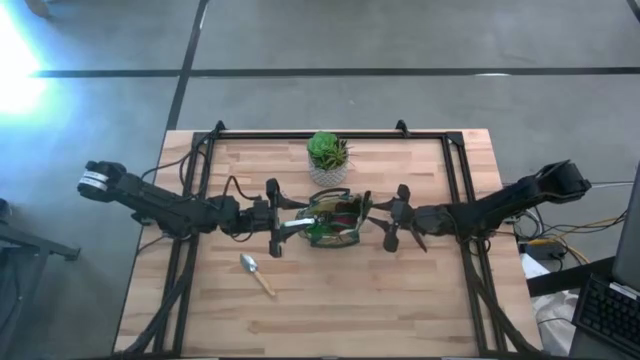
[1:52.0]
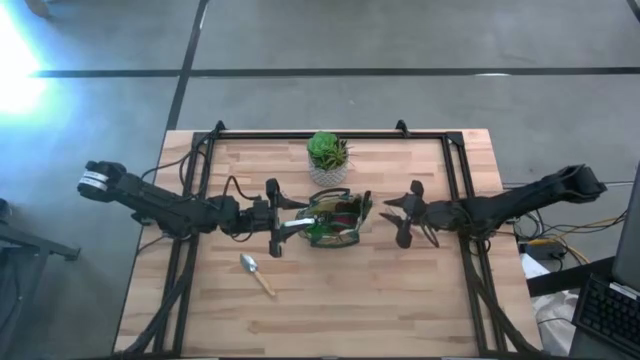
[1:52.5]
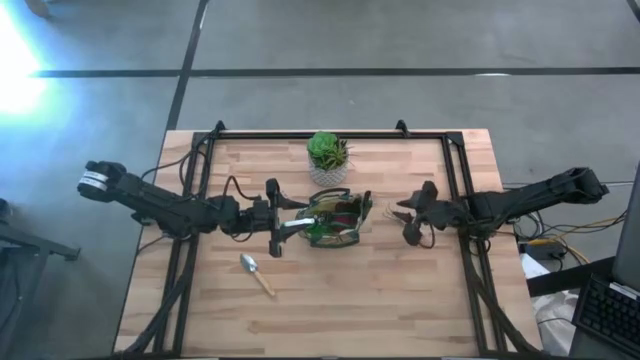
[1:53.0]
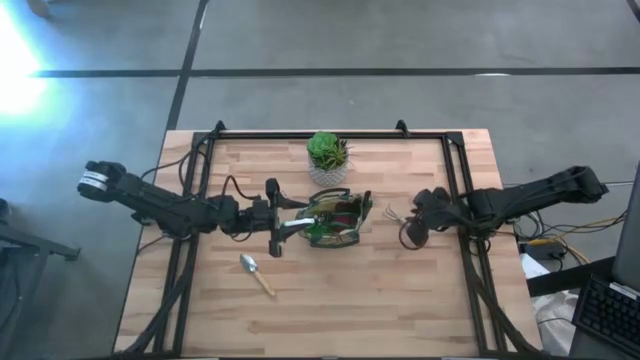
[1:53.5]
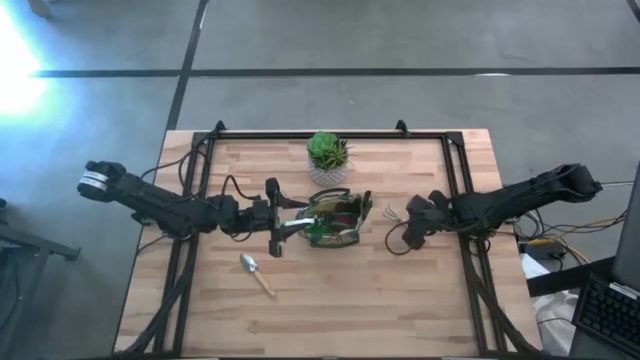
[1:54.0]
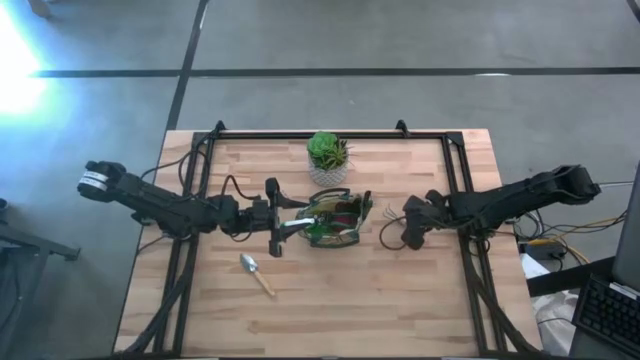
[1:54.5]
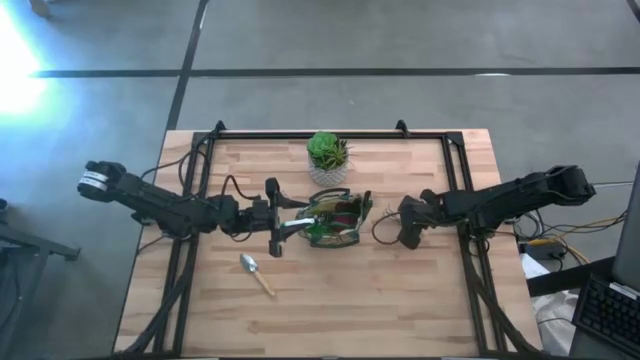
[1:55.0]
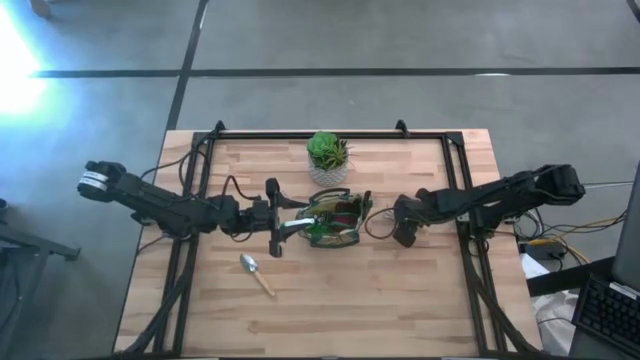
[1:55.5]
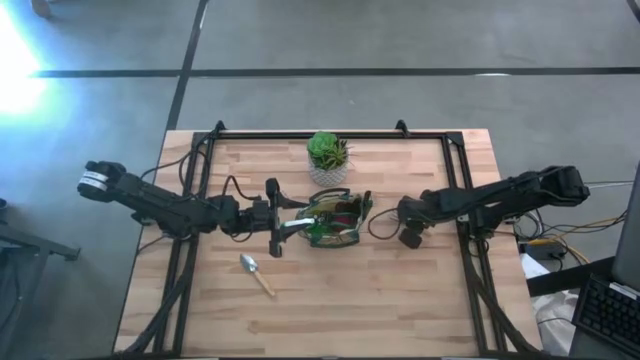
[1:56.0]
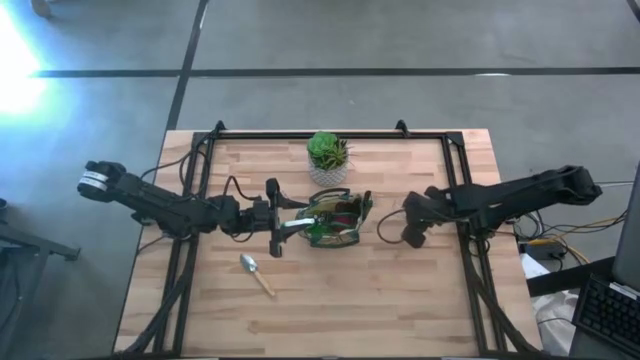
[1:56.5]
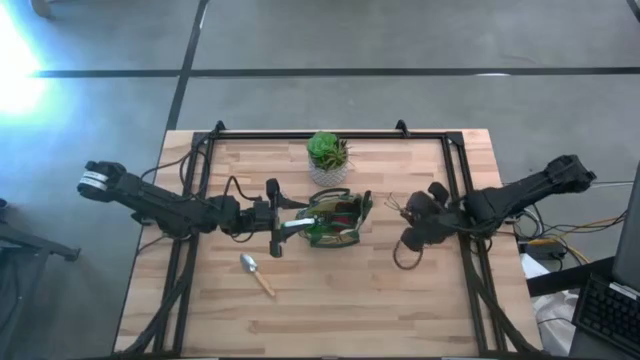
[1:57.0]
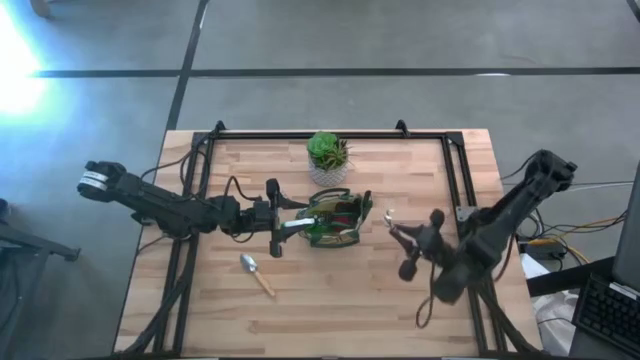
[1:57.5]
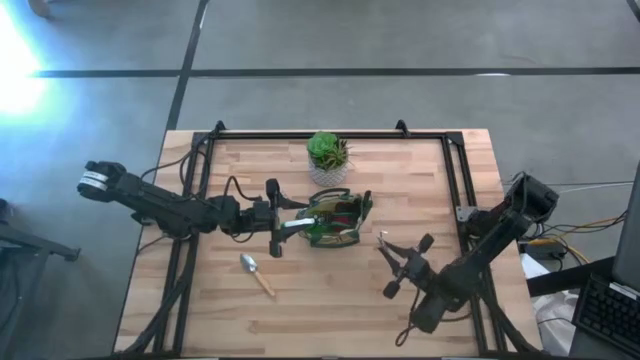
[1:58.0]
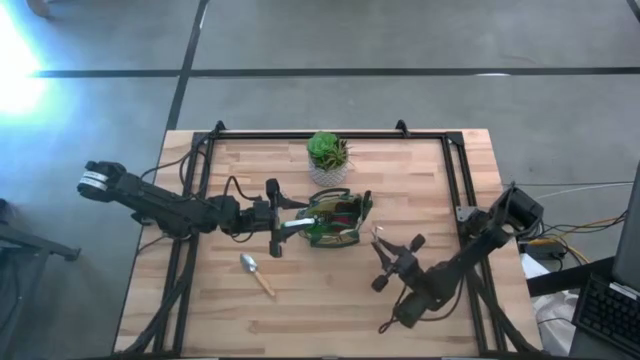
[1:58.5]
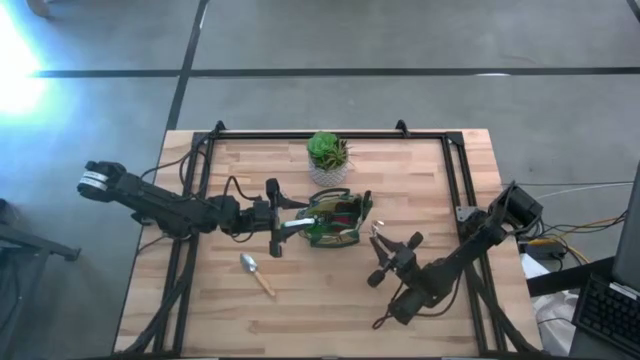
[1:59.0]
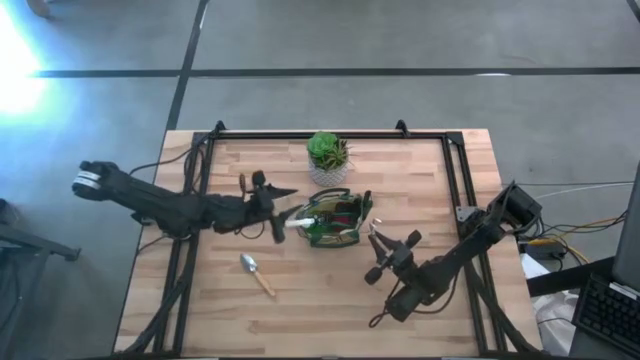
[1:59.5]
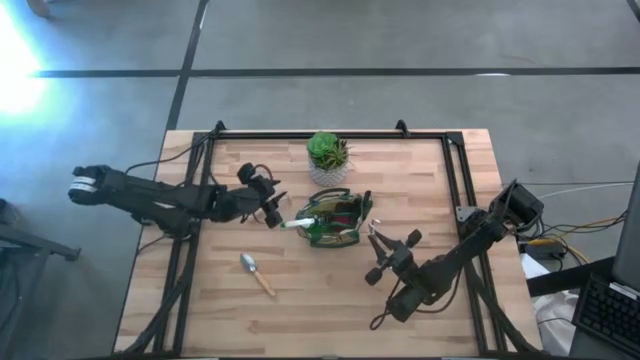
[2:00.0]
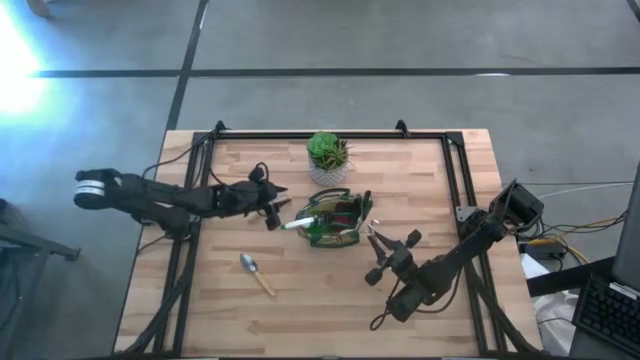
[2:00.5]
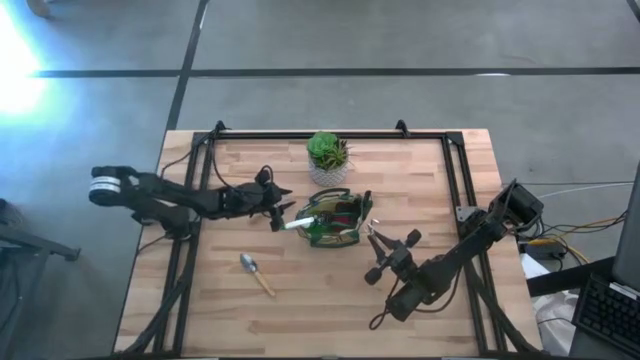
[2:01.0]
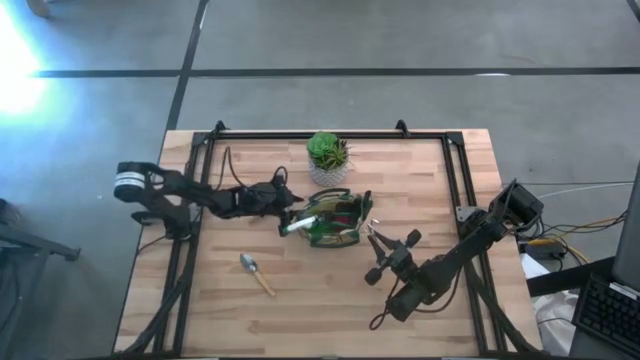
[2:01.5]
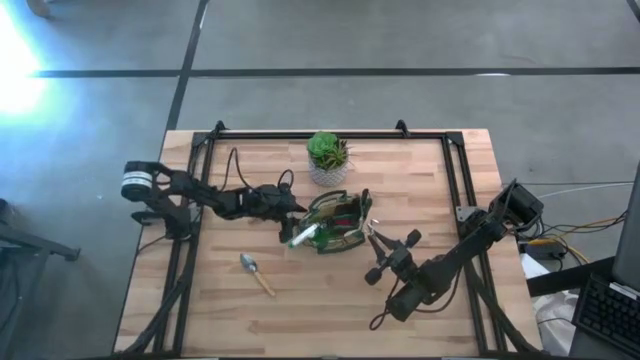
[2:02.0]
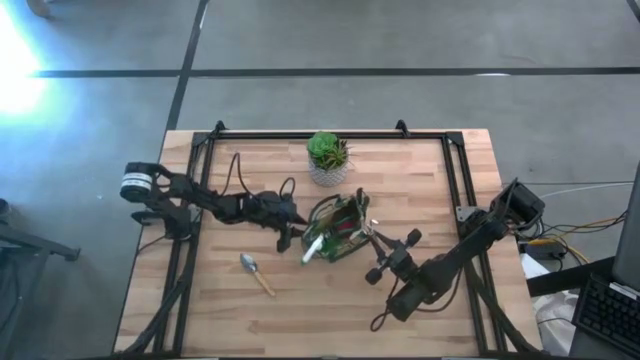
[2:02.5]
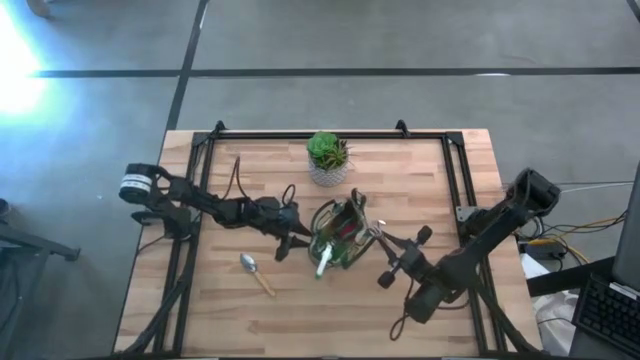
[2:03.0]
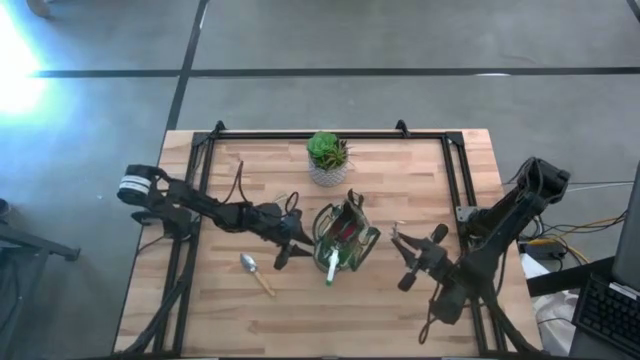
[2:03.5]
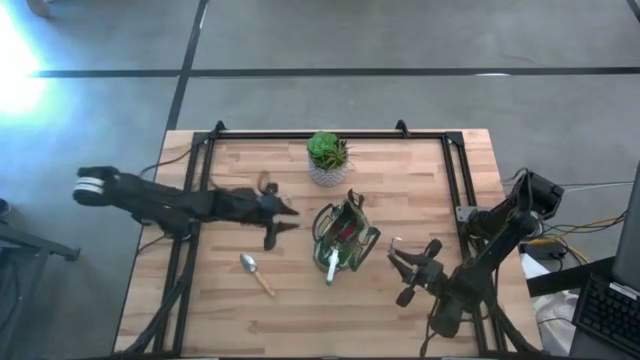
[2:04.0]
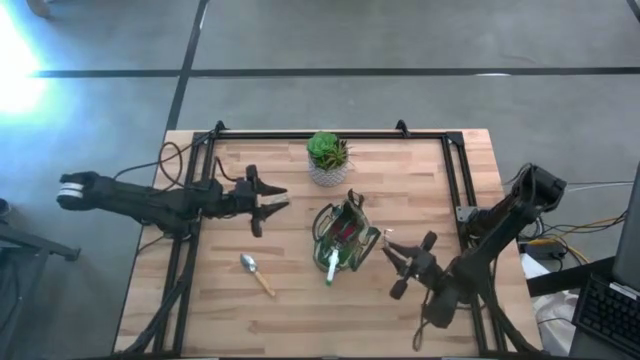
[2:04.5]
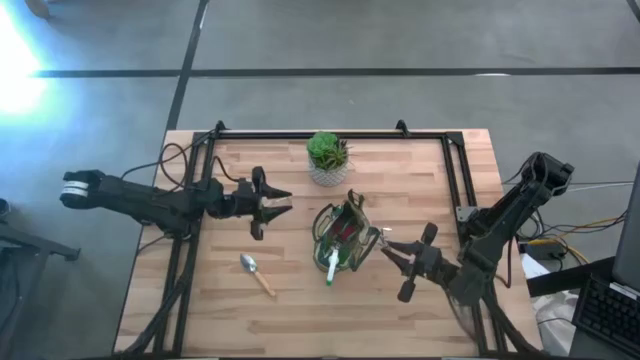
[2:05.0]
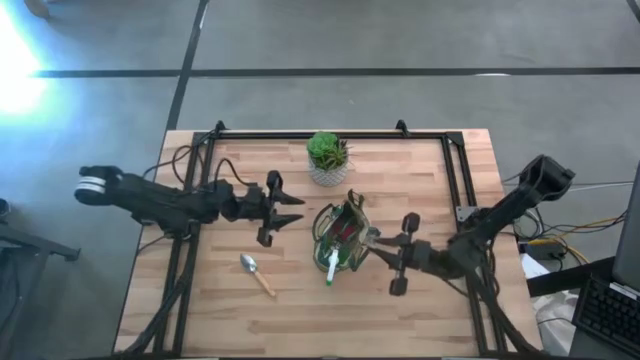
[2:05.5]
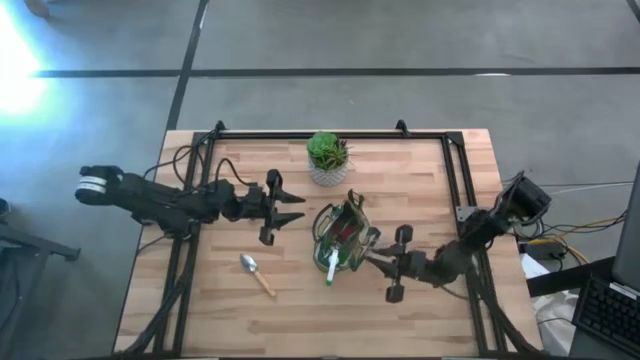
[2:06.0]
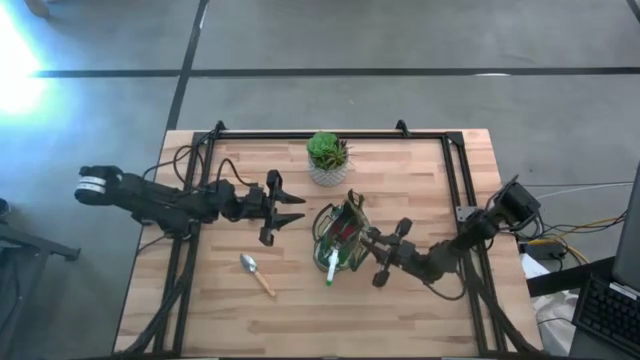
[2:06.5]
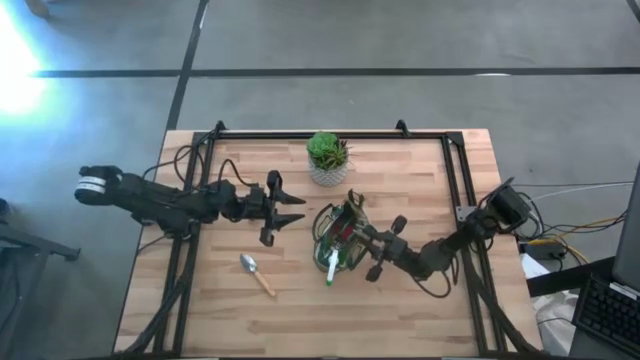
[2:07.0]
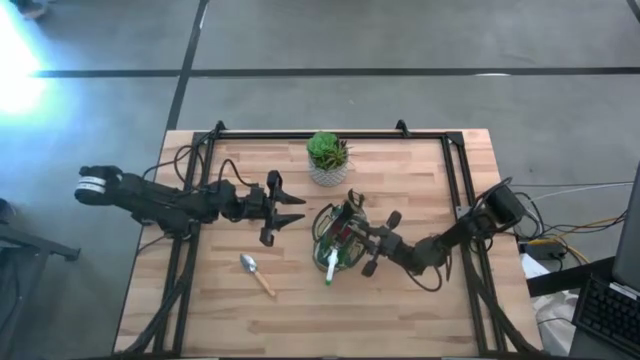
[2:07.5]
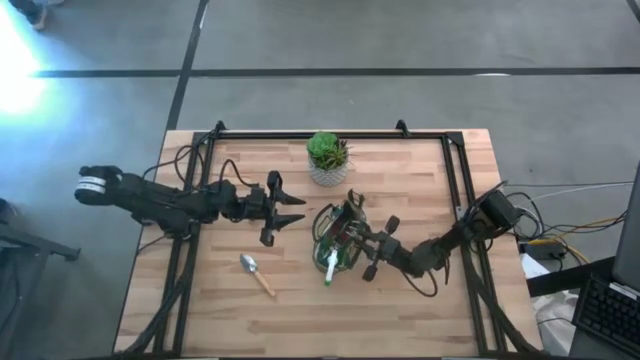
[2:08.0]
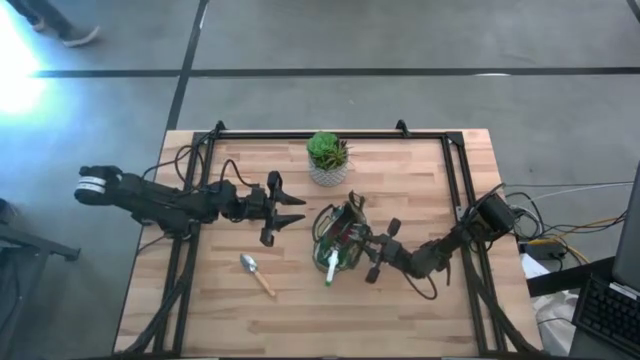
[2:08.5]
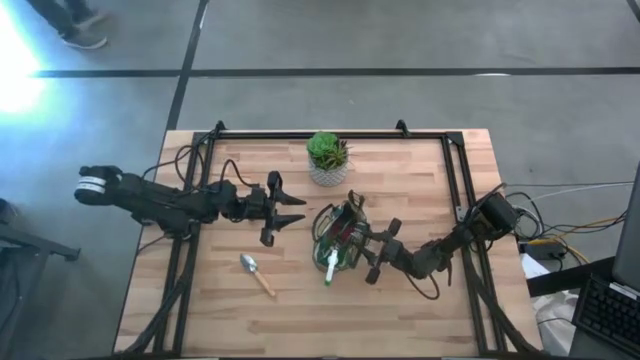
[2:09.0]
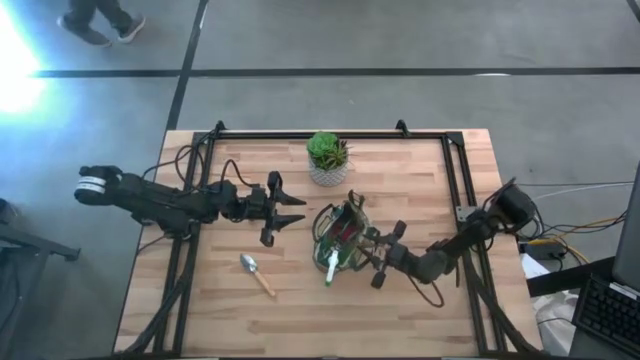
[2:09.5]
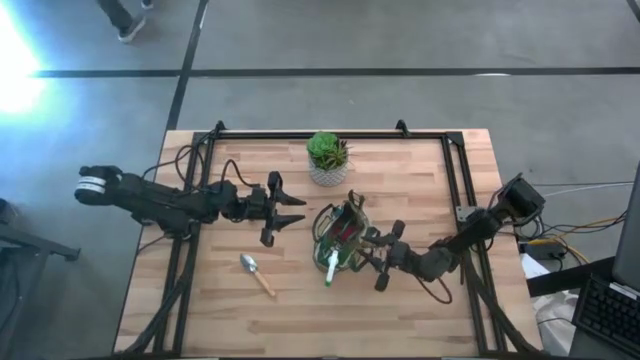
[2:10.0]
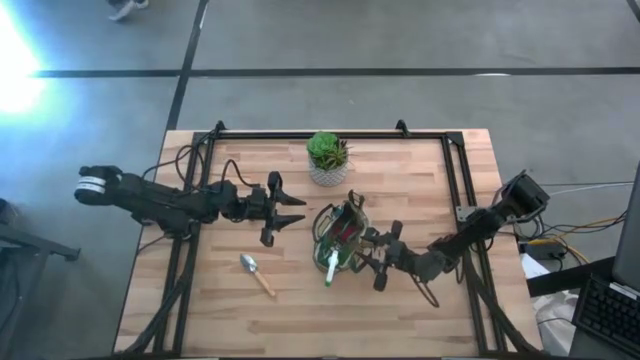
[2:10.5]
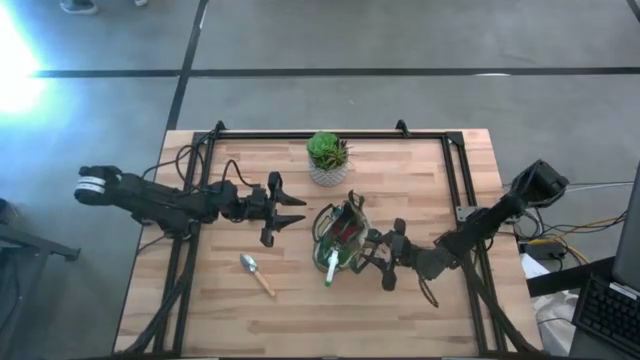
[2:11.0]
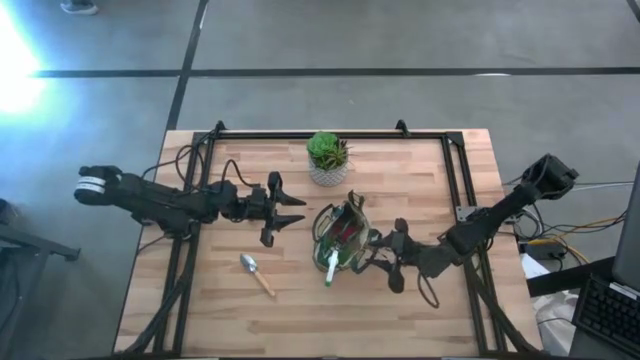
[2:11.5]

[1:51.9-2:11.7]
Task: Pick & Place Garden tools in Gardening bag
Put the right brown hand rake into the side pocket of the gardening bag

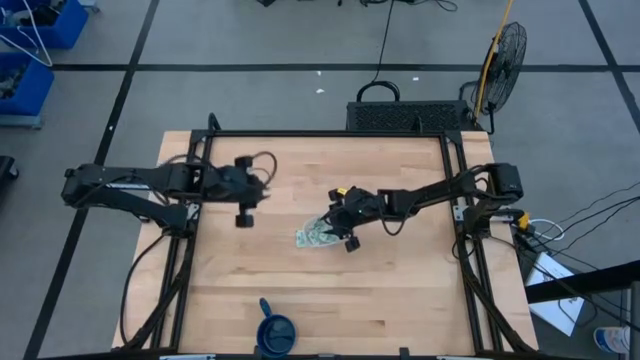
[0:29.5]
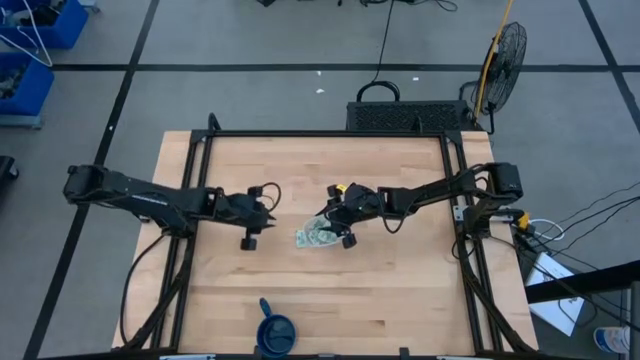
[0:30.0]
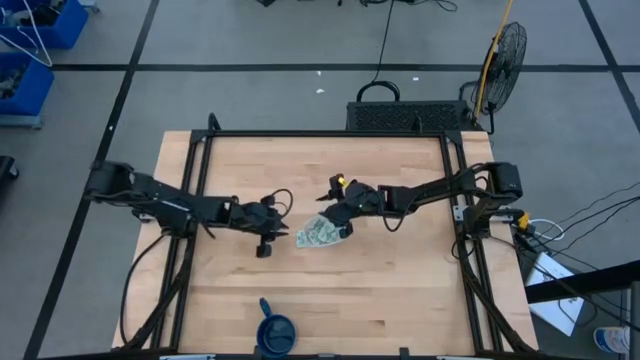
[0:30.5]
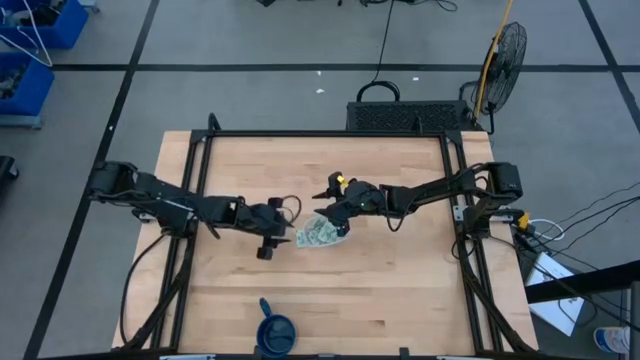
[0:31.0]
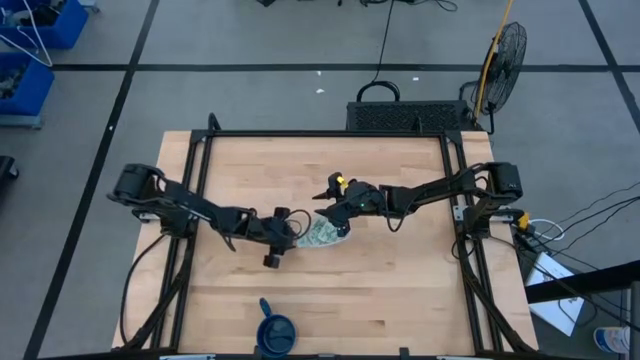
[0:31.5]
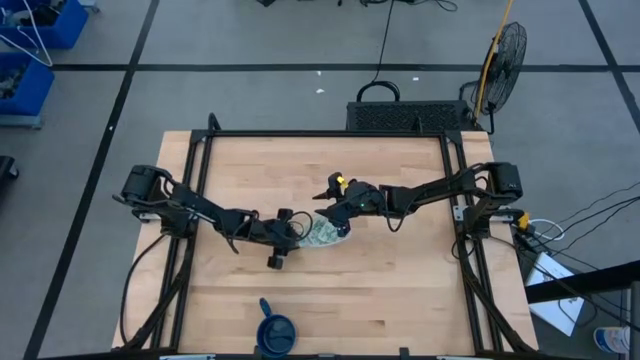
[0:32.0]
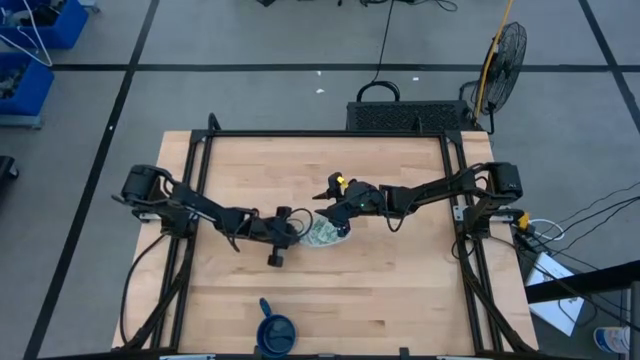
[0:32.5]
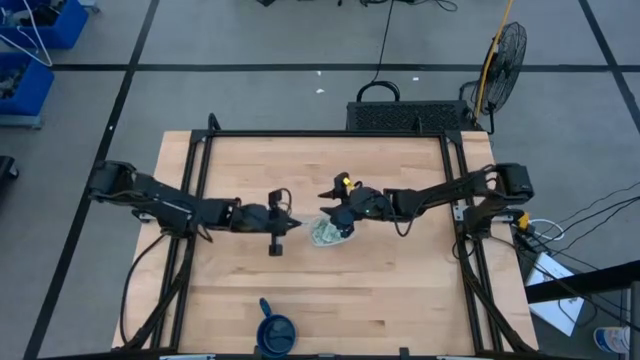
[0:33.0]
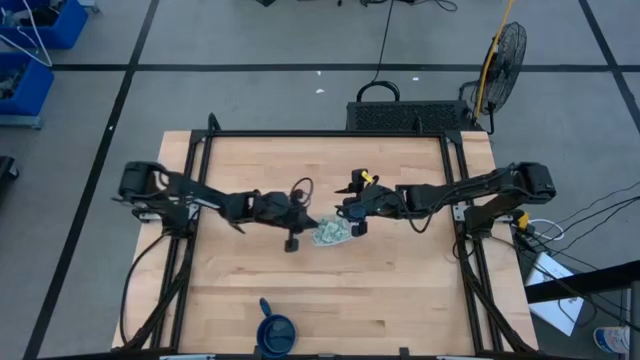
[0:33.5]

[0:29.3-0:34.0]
Task: Pick and place Stevia / Truvia into bins
Put the stevia packet into the transparent container
